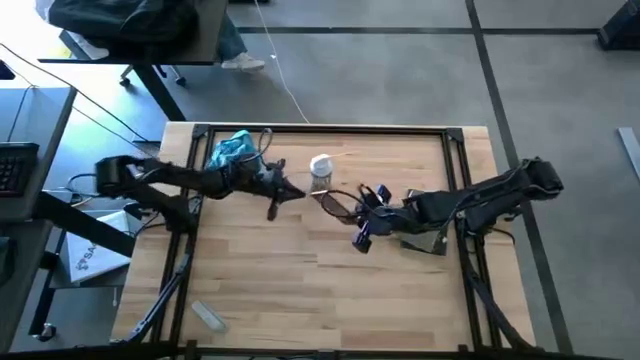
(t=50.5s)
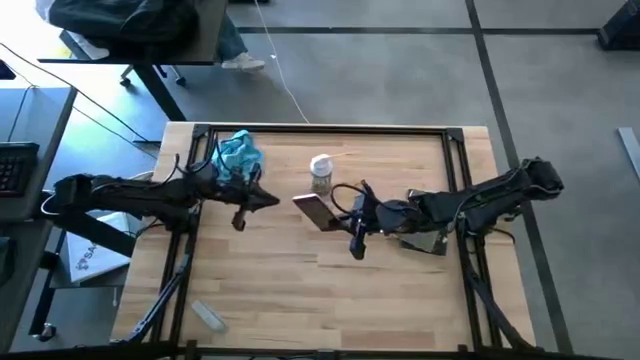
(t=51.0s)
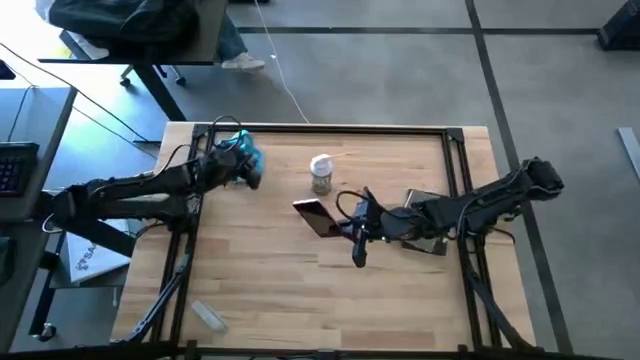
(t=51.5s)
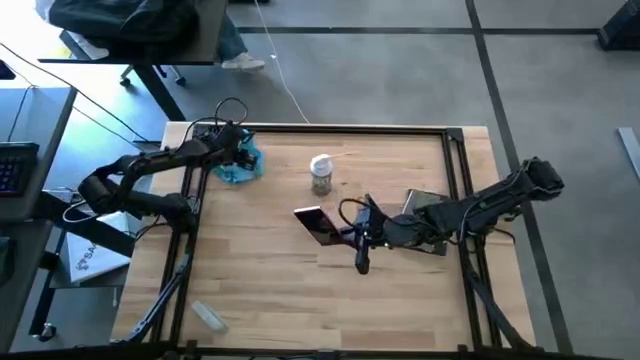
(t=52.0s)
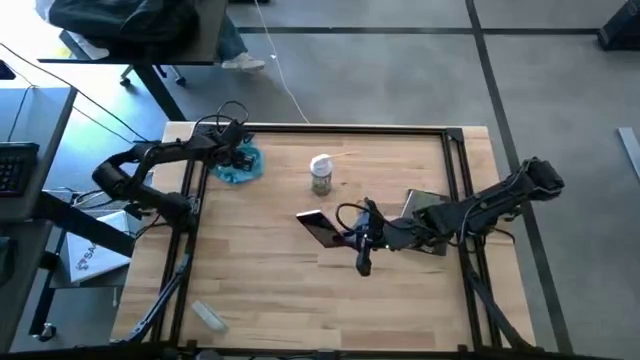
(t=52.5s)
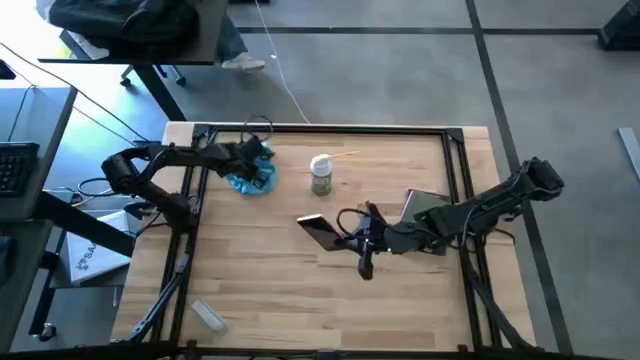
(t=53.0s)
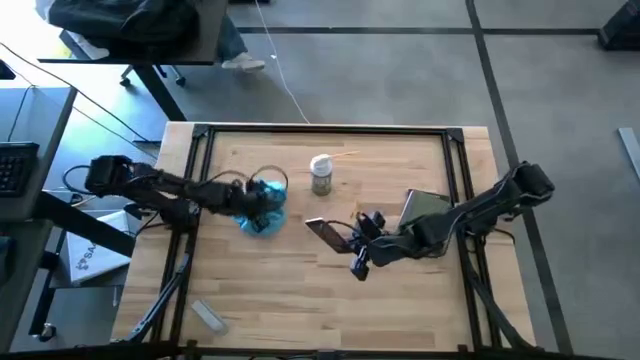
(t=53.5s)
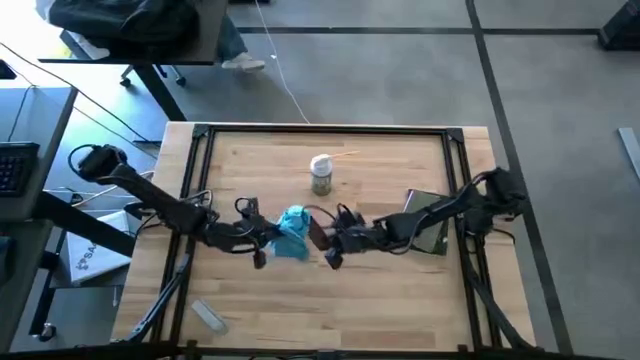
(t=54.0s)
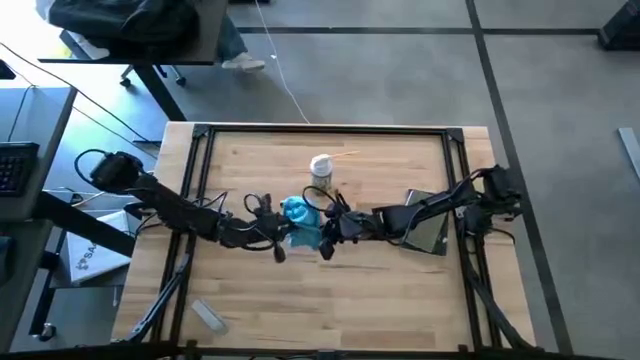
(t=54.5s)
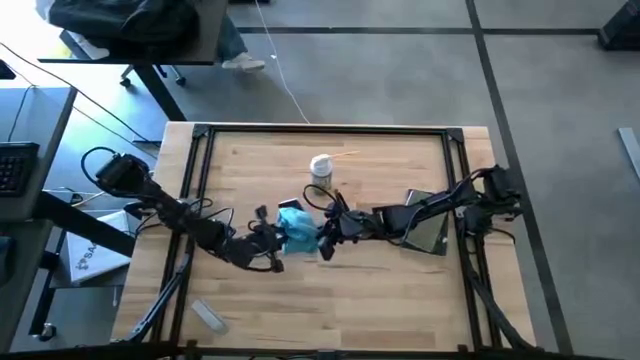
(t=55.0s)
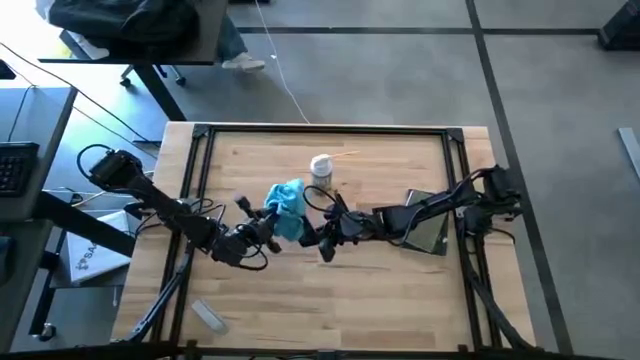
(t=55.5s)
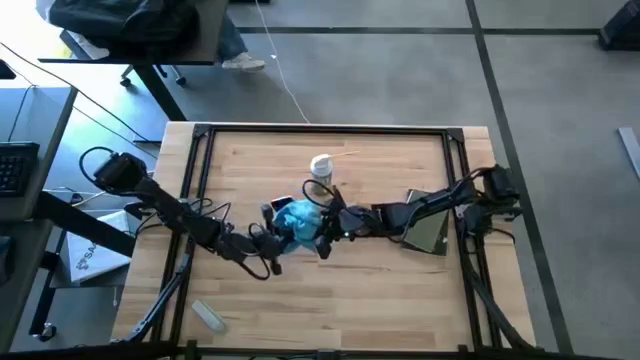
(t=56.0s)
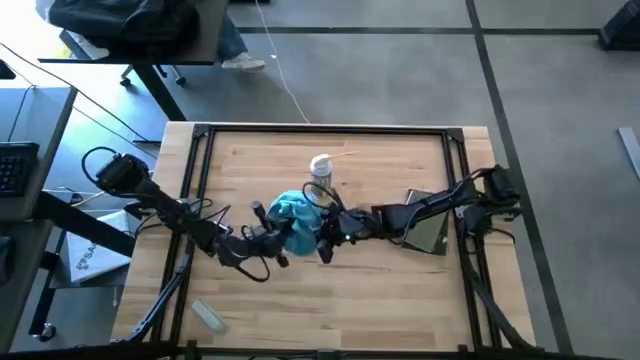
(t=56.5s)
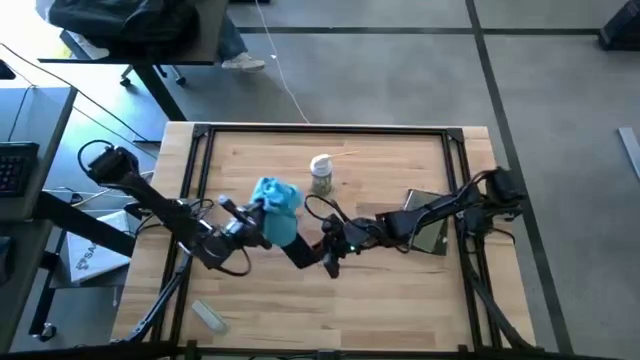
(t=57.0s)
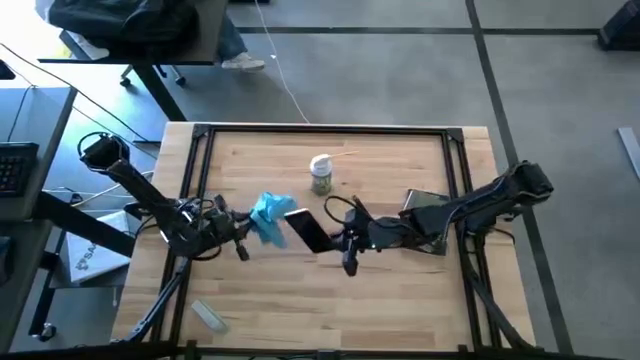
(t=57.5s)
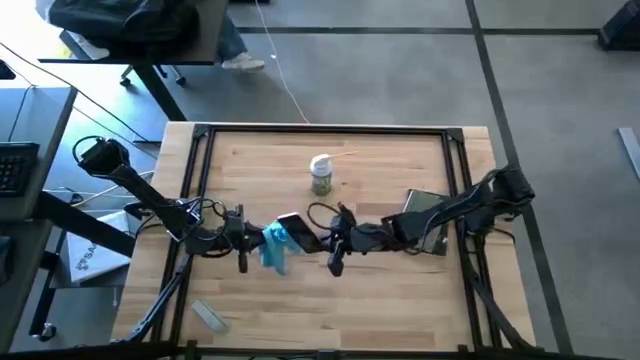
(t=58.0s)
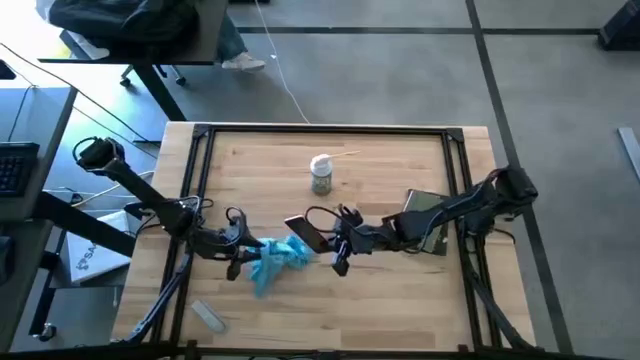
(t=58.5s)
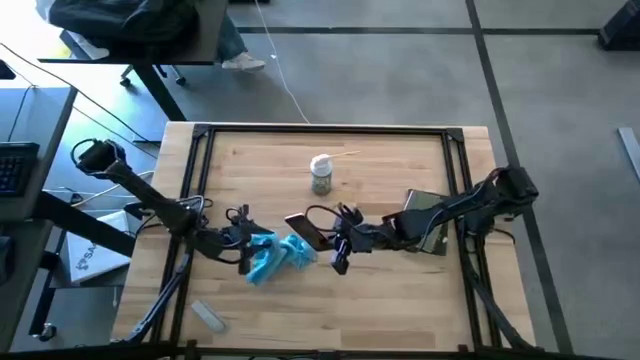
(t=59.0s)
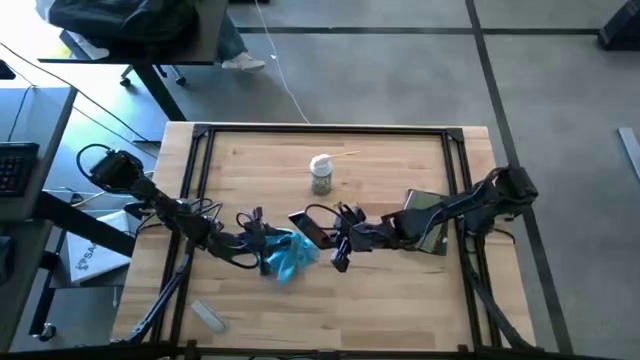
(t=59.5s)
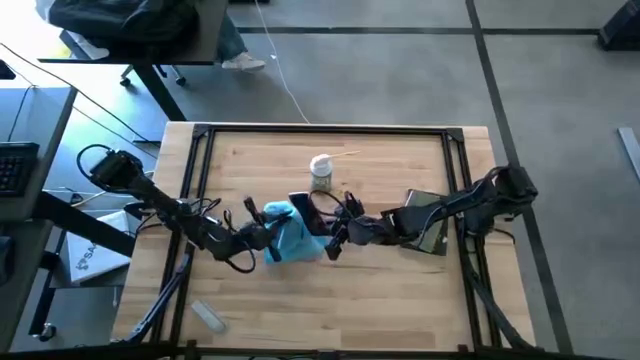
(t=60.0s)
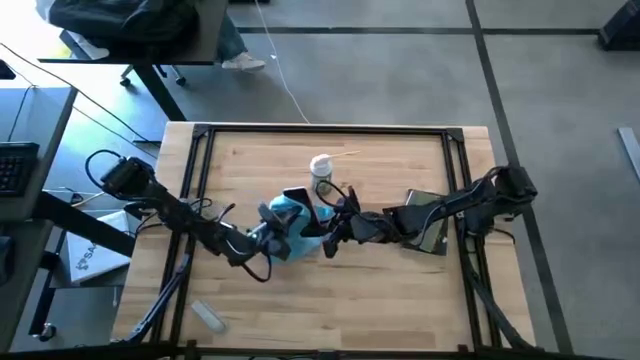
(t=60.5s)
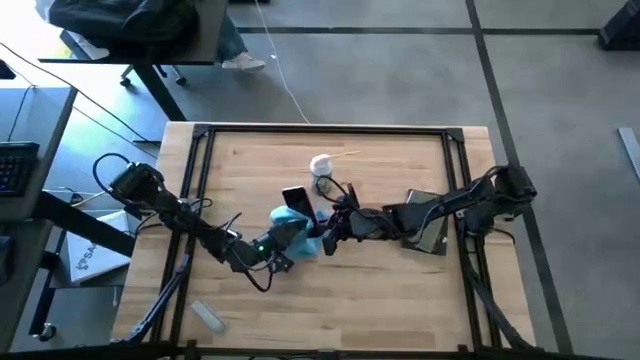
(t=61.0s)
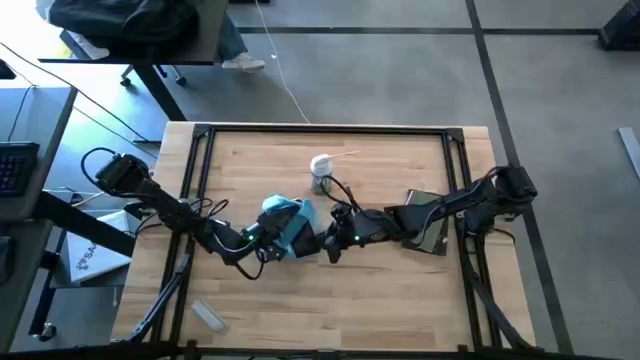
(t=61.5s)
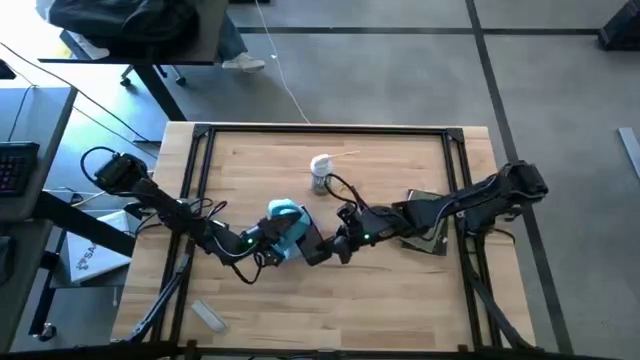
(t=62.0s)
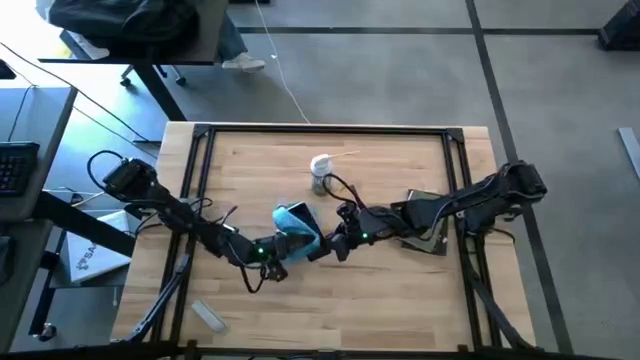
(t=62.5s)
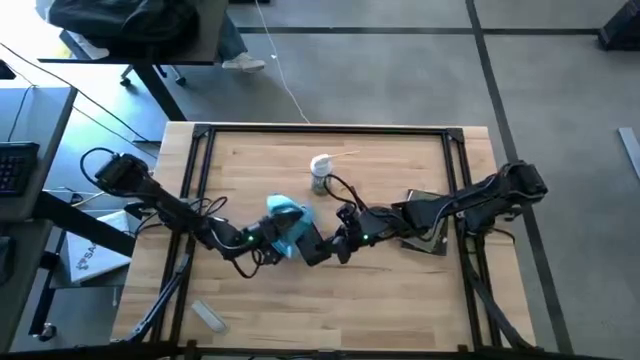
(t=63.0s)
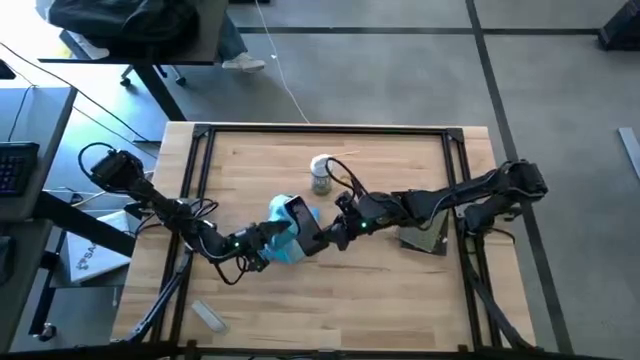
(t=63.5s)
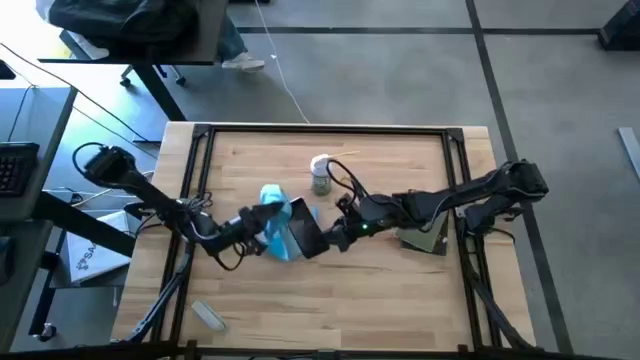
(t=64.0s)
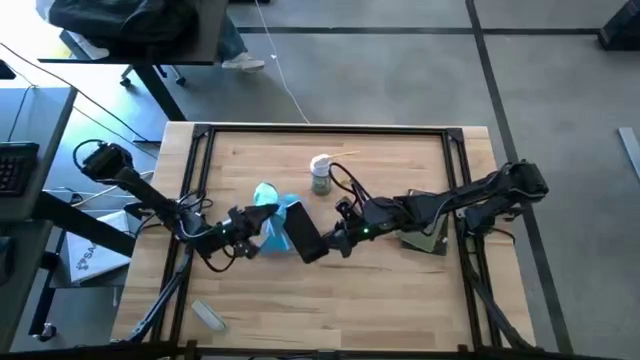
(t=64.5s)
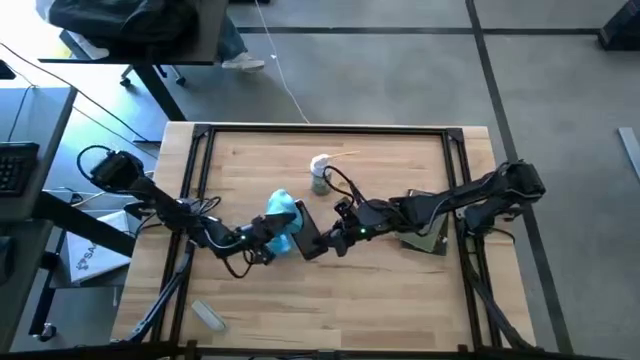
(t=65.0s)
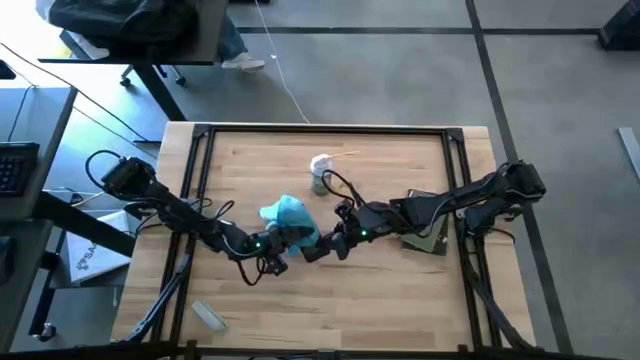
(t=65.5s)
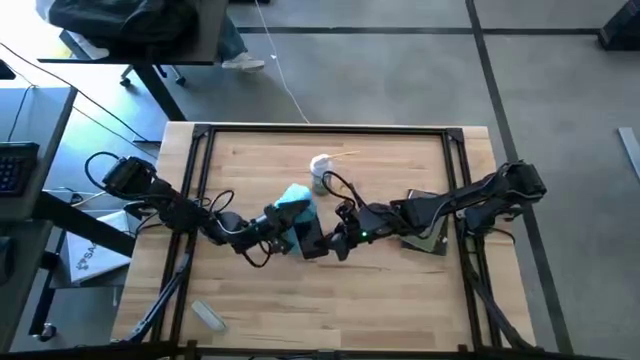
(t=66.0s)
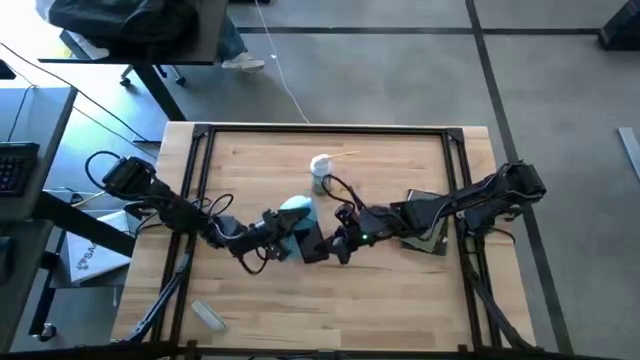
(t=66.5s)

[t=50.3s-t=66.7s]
Task: Apply microfiber cloth
Wipe the front and back of the pink cellphone with a blue microfiber cloth
